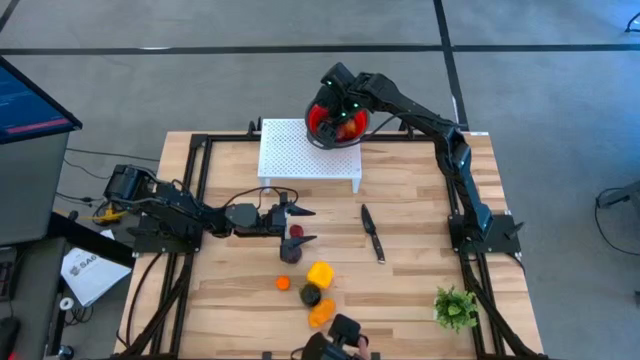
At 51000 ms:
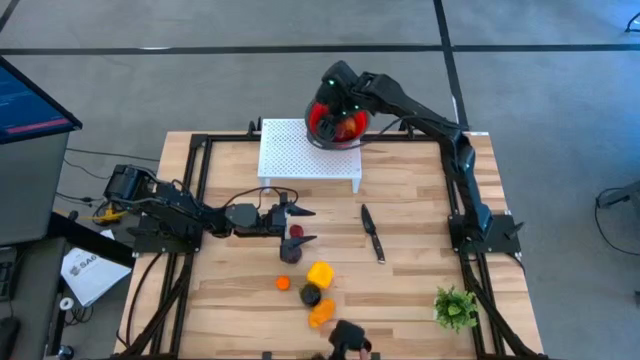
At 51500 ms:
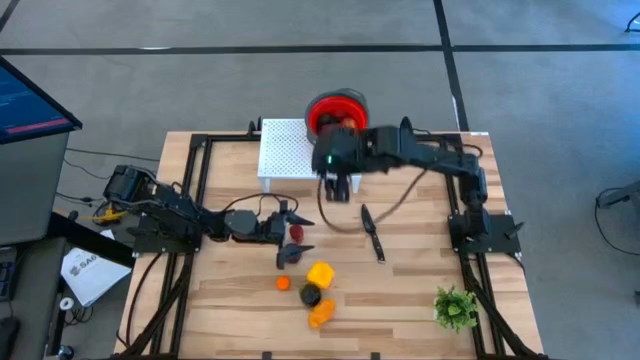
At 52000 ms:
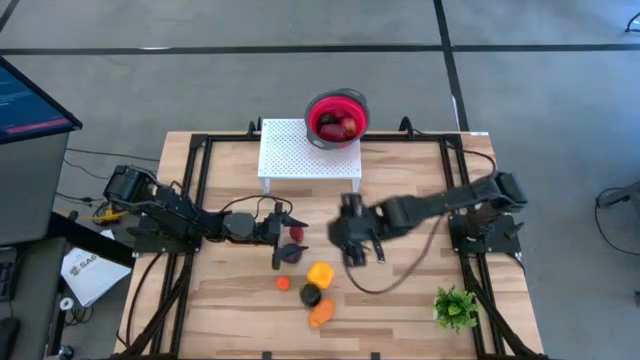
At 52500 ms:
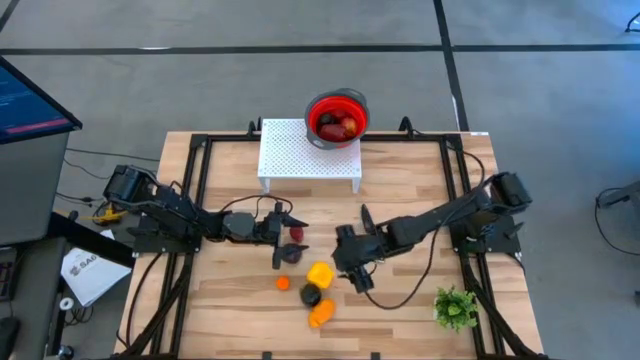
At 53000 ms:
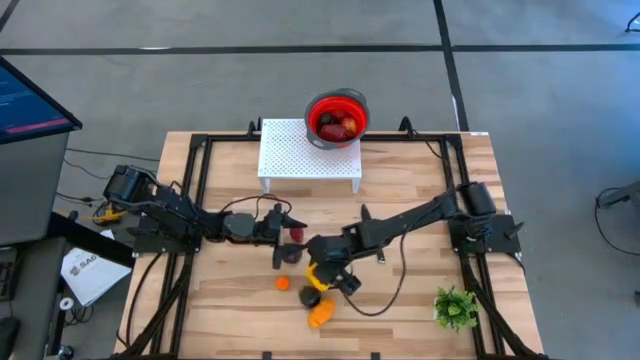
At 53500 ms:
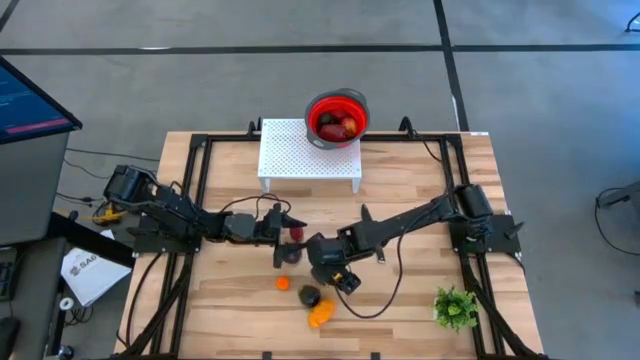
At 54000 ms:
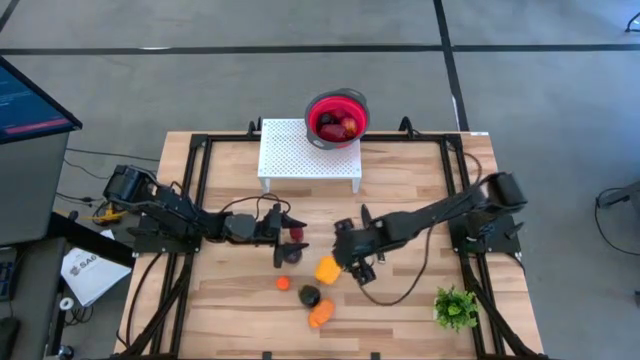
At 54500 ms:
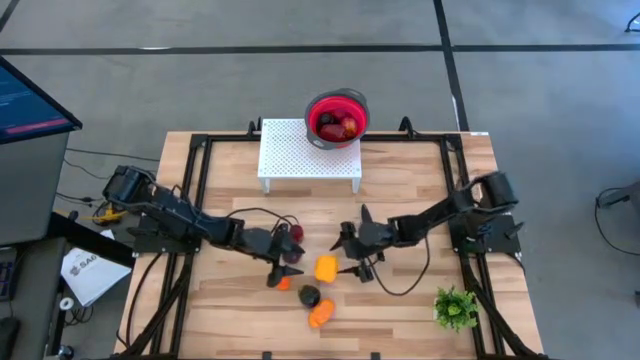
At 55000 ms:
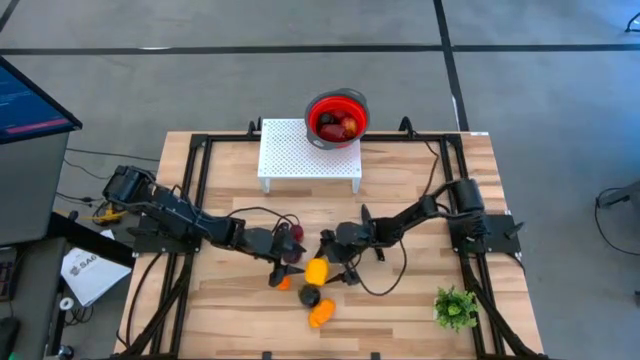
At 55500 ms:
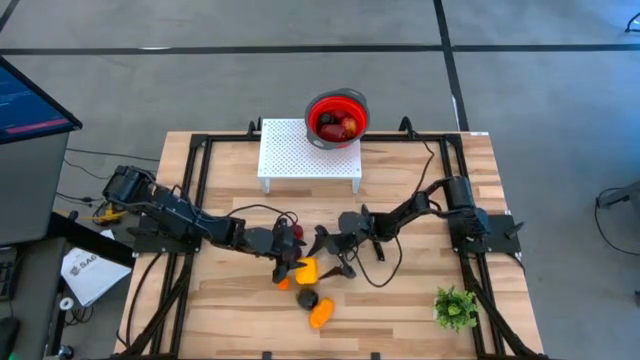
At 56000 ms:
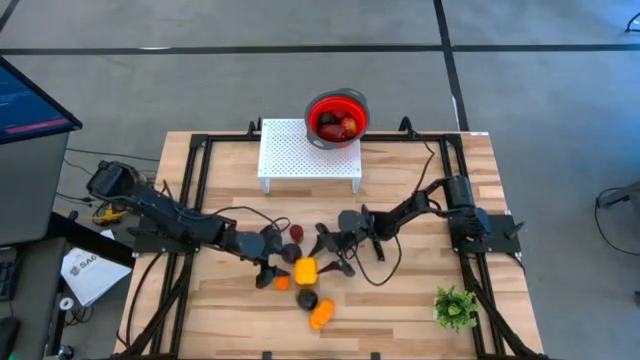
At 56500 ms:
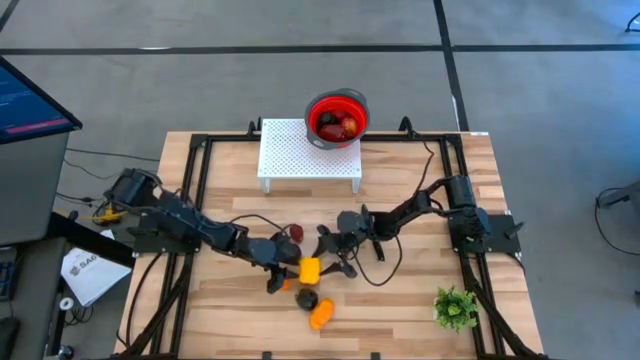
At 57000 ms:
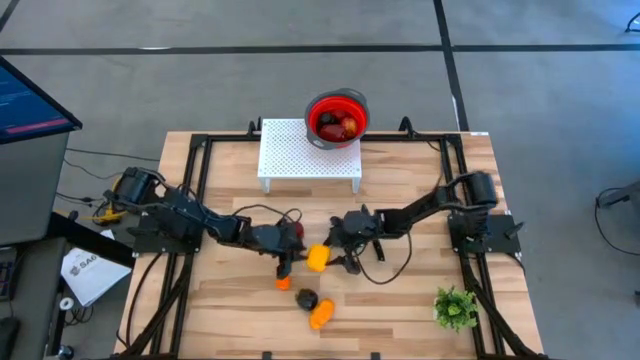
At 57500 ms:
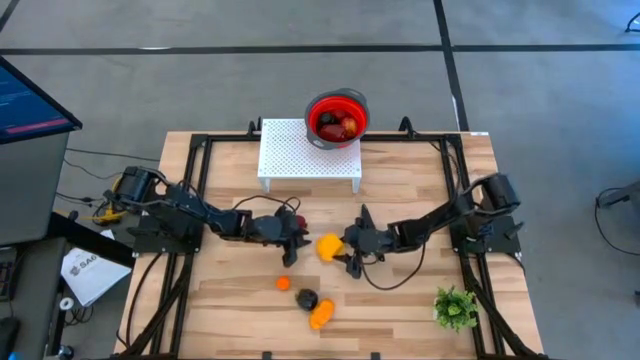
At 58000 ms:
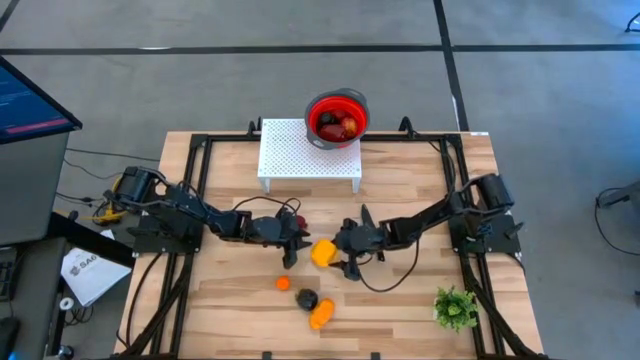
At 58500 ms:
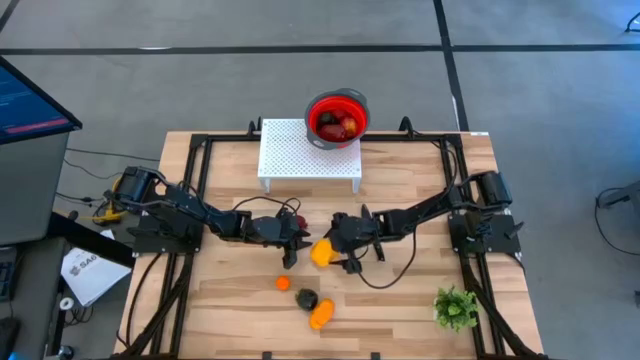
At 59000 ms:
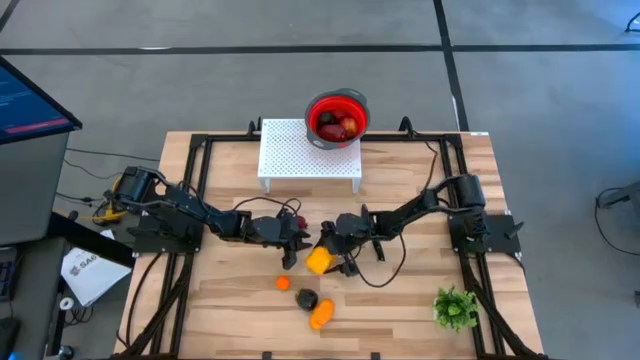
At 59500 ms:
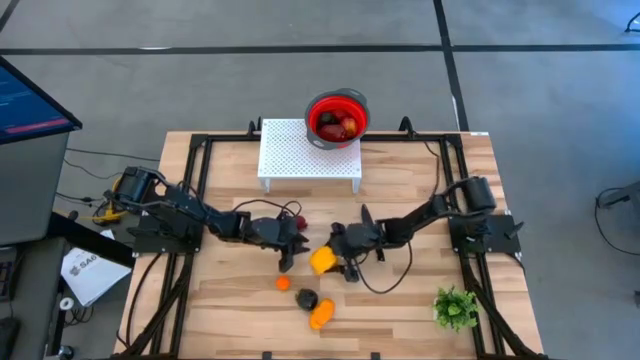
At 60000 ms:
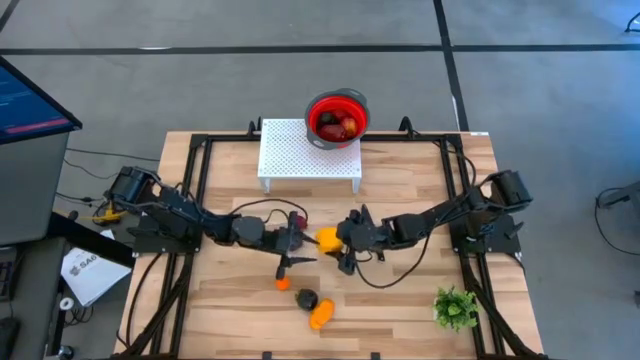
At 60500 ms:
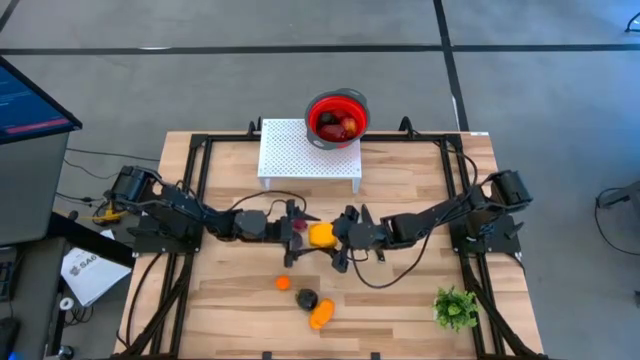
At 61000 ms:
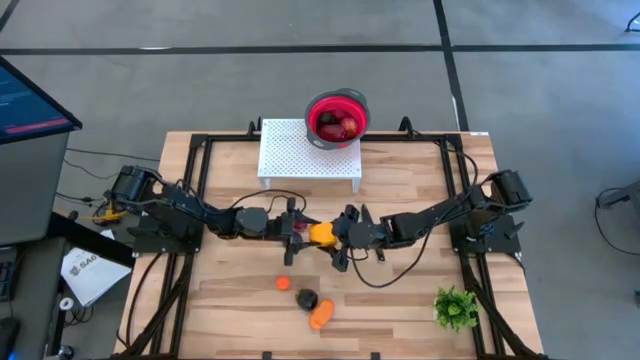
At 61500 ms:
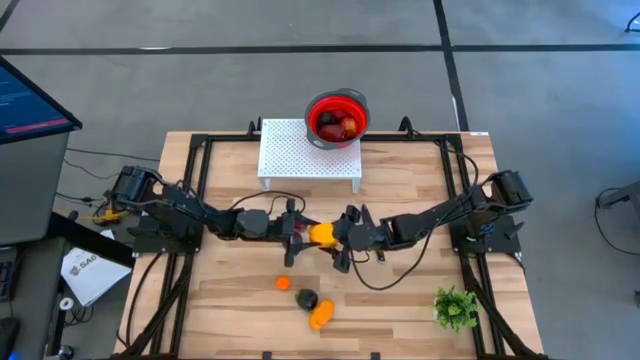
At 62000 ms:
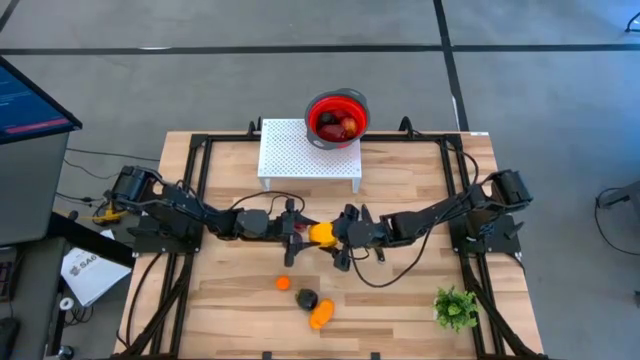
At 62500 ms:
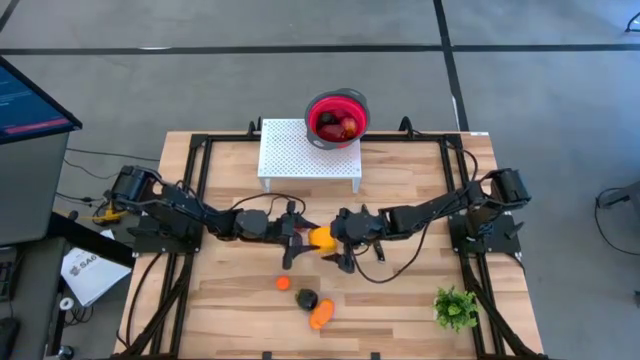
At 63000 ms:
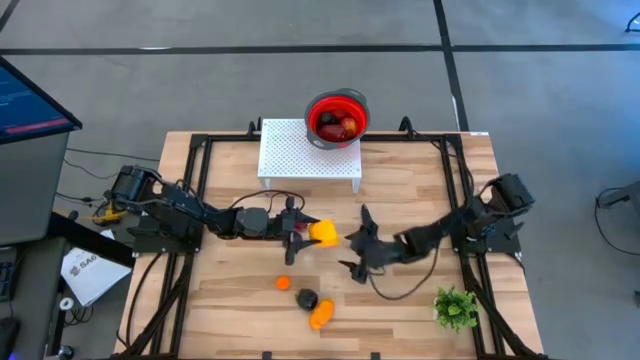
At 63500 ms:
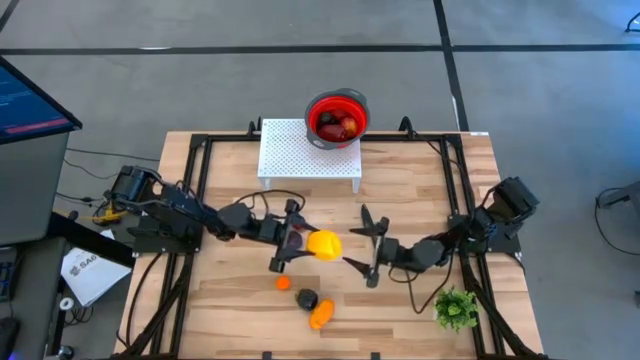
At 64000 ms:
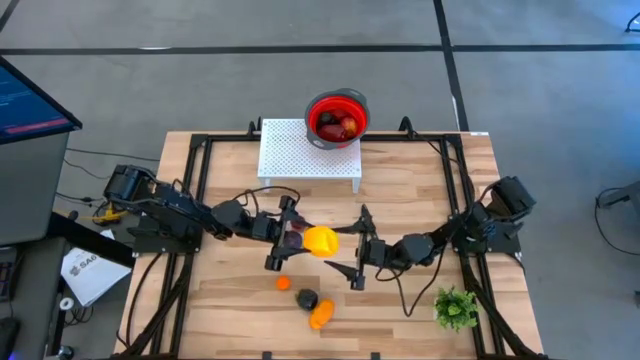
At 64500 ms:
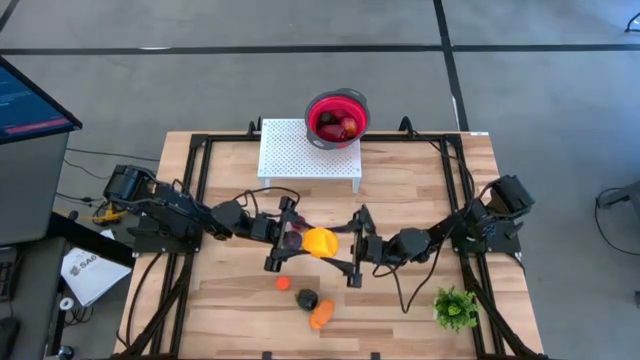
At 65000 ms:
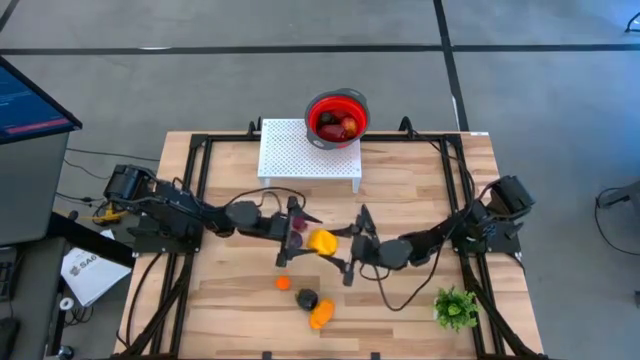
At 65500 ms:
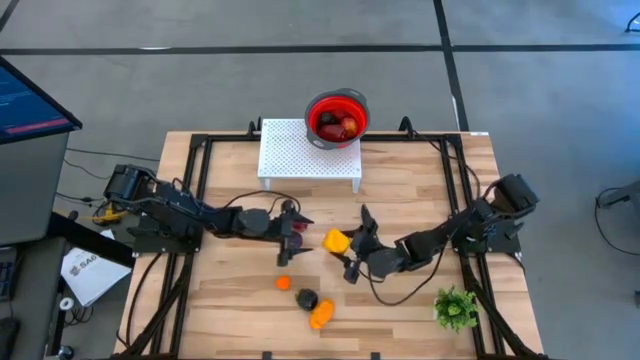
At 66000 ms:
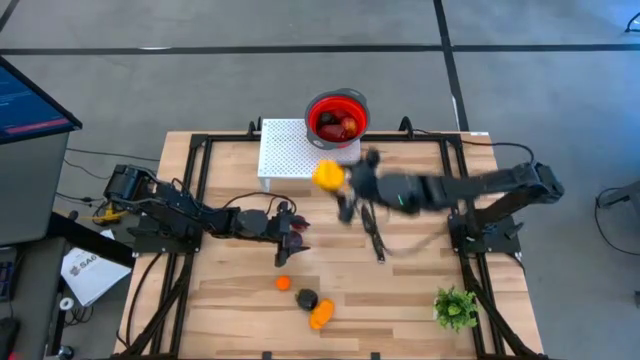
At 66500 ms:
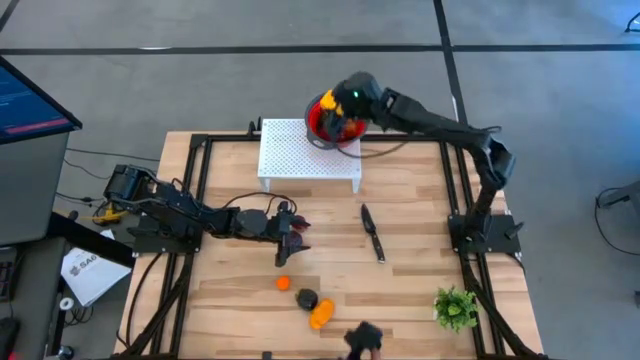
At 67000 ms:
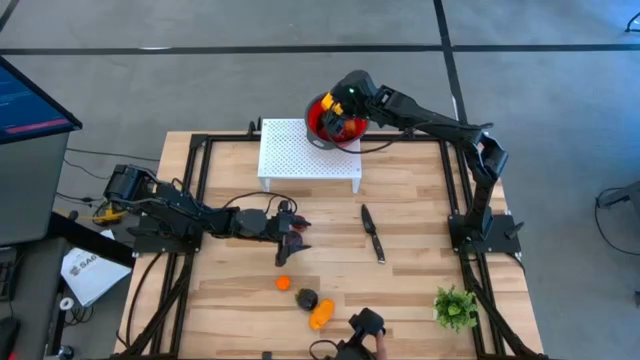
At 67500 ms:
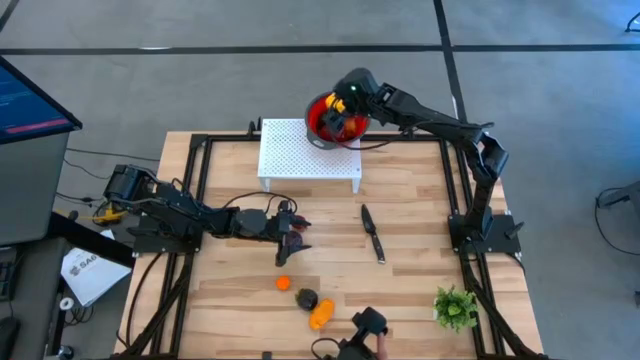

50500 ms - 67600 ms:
Task: Pick & Place Fruit
Put the yellow bell pepper into the strainer bowl on the shelf

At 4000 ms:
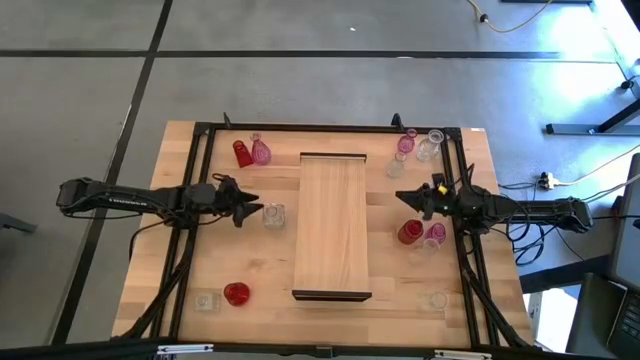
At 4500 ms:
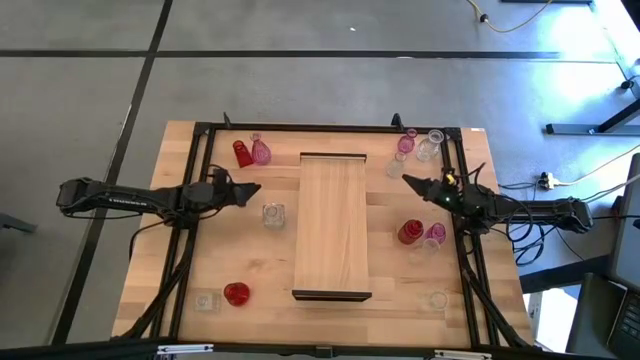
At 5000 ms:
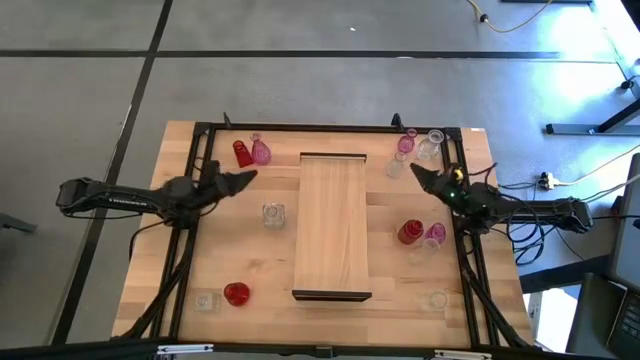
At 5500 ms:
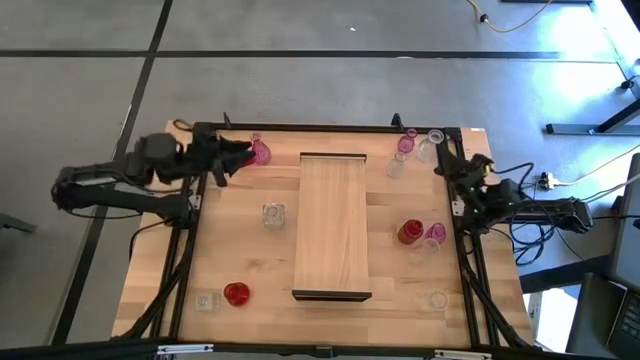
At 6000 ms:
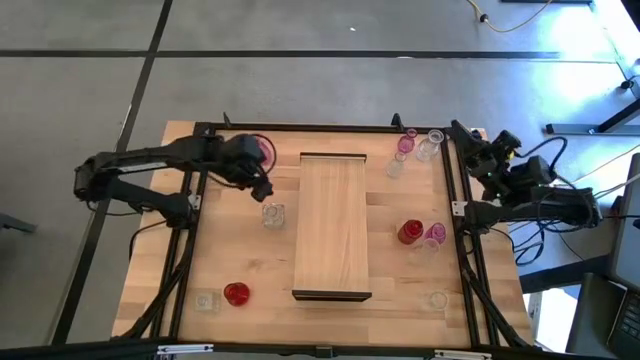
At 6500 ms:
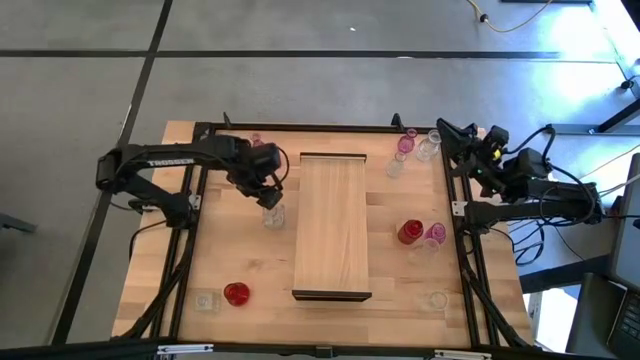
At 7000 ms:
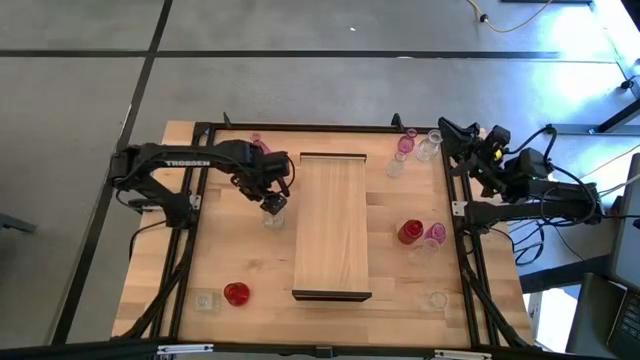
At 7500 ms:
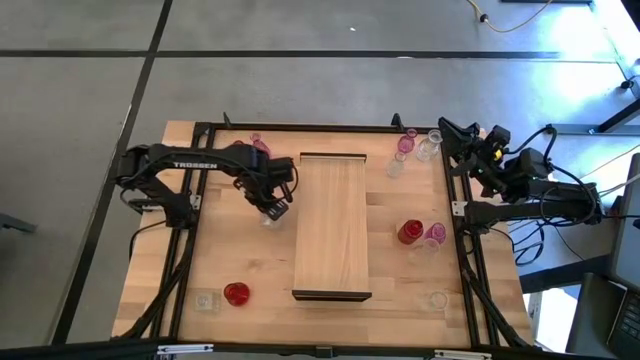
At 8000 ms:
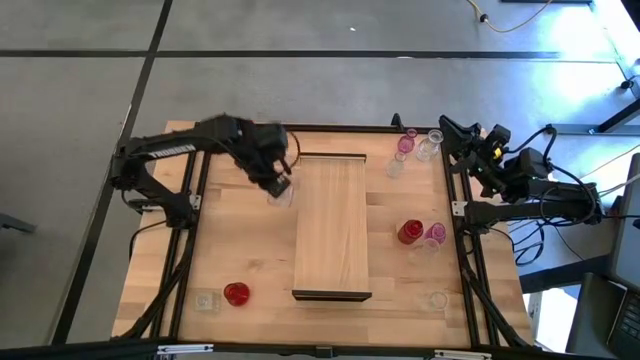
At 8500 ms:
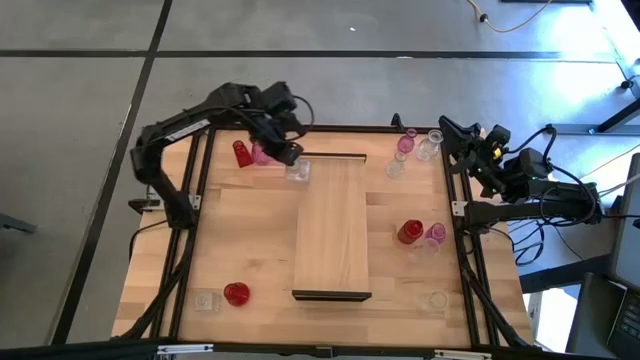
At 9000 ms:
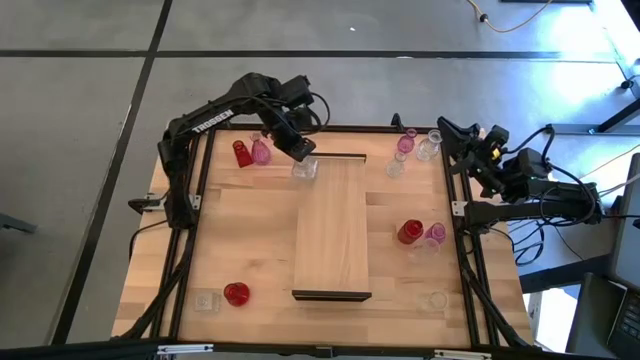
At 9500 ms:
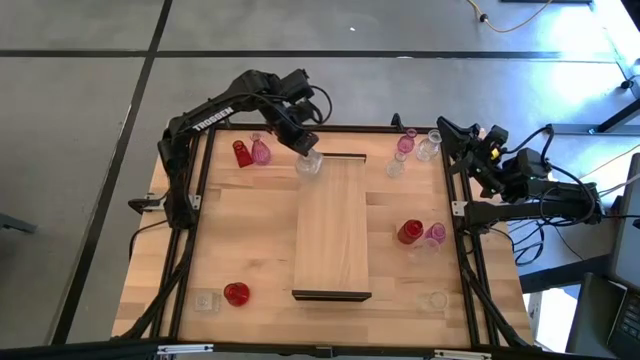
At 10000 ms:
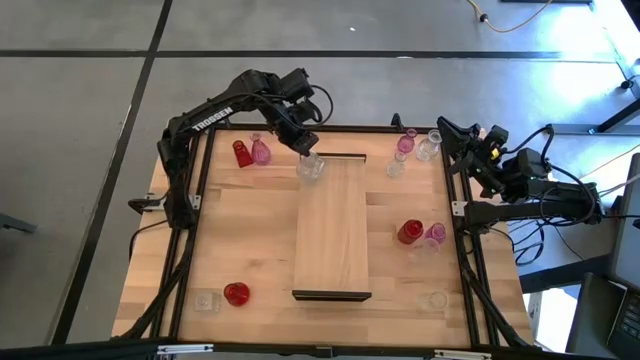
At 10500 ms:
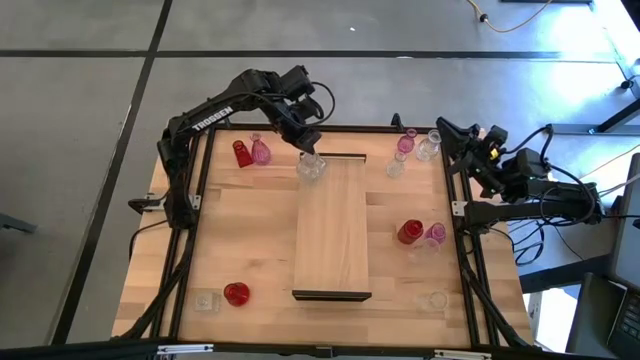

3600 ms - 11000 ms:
Task: sort vases onto shelf
Put the transparent vase on the shelf
